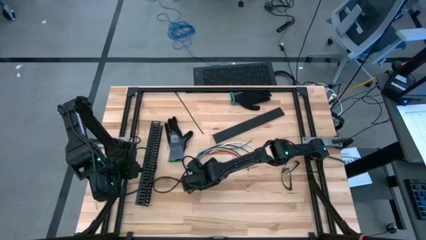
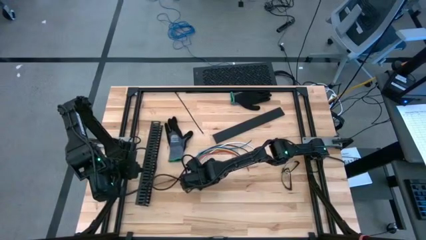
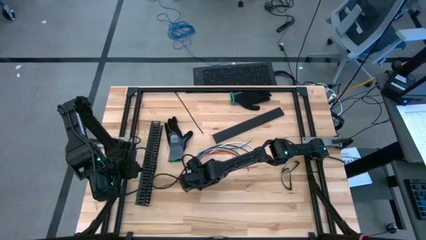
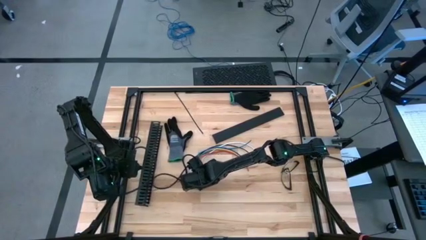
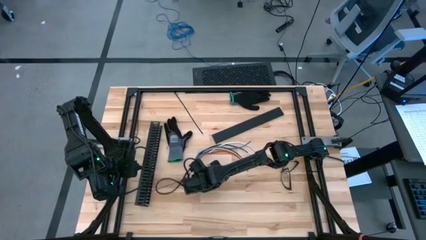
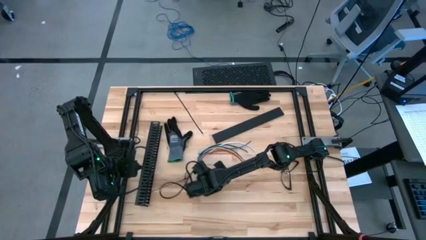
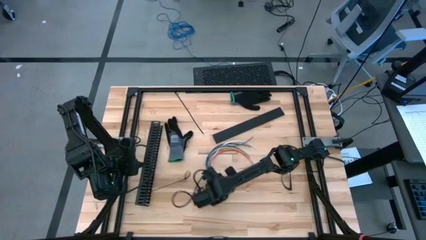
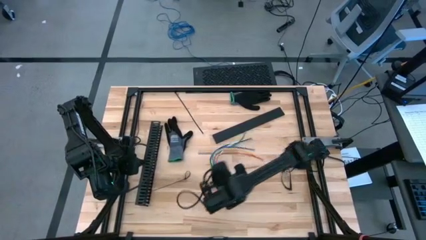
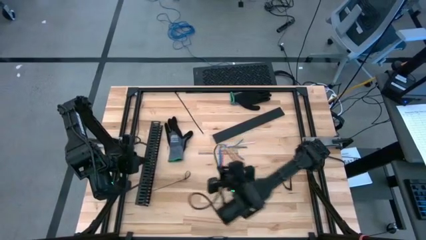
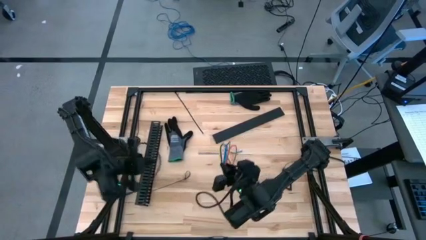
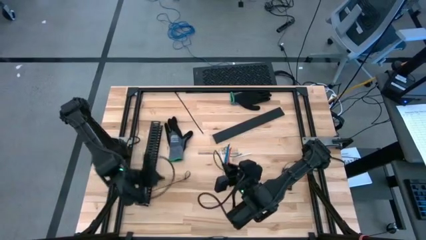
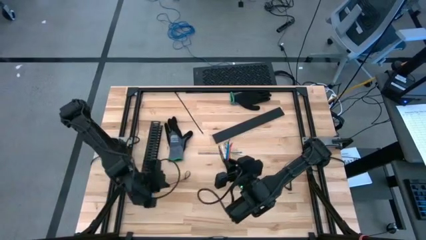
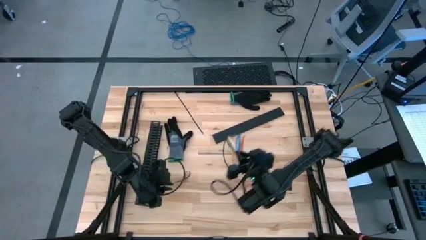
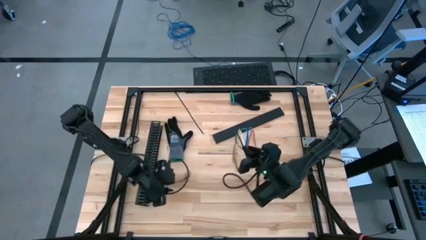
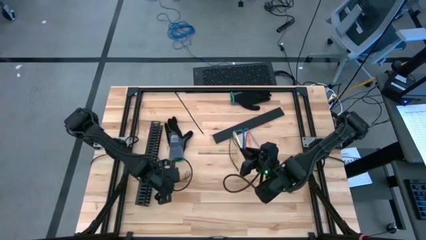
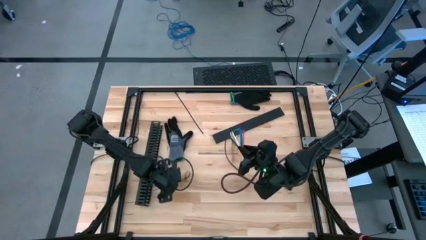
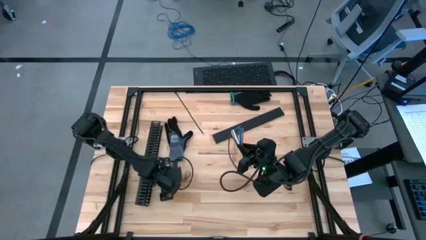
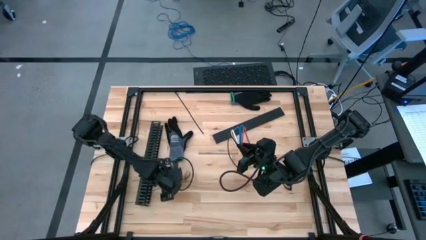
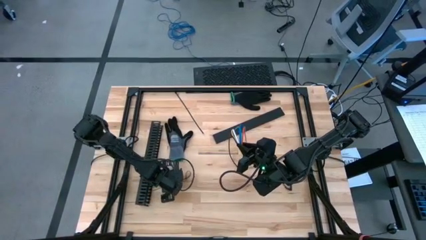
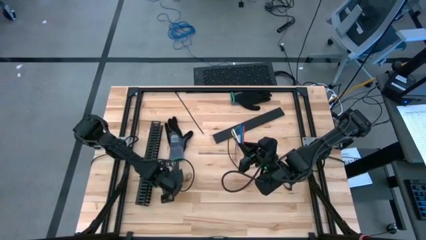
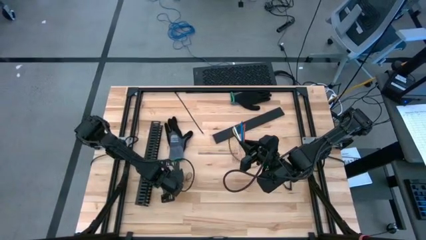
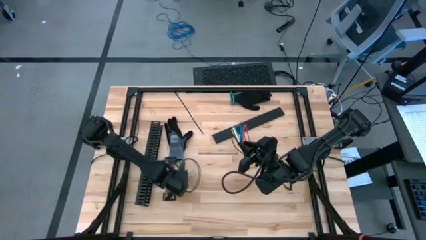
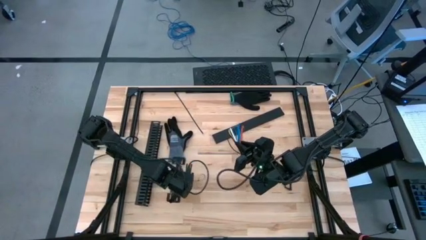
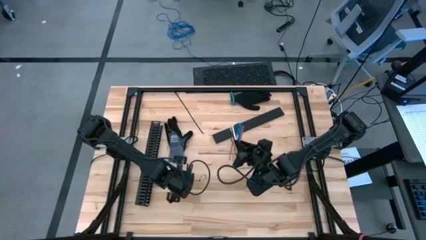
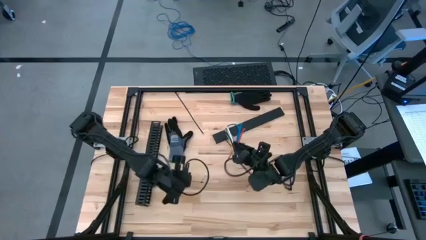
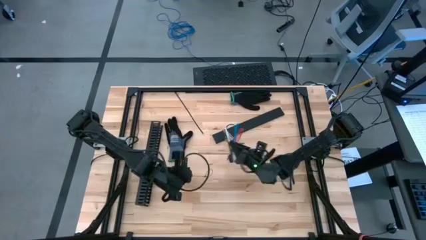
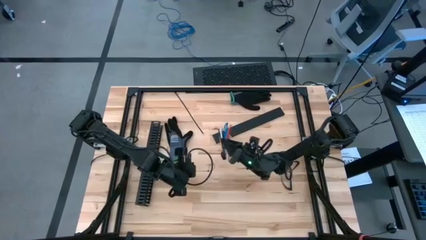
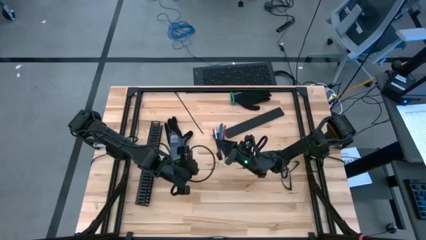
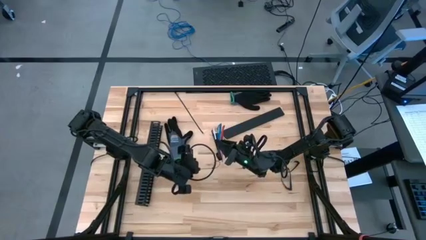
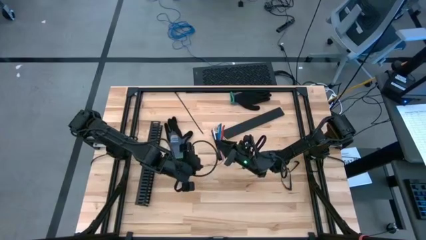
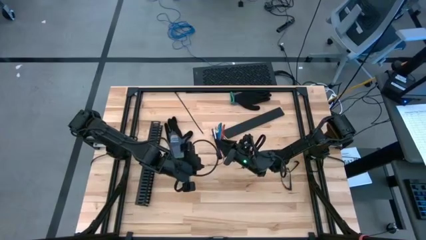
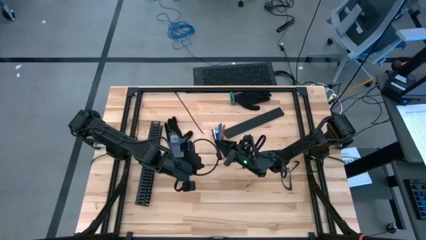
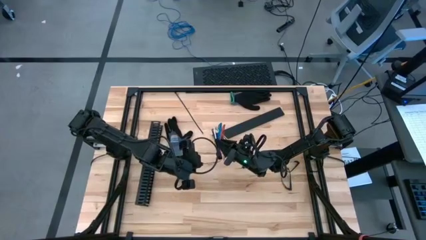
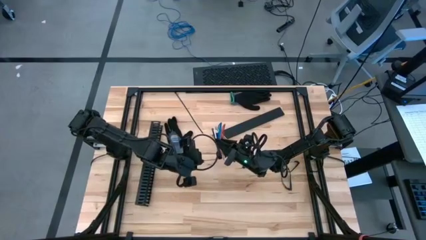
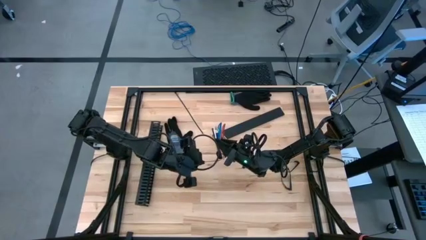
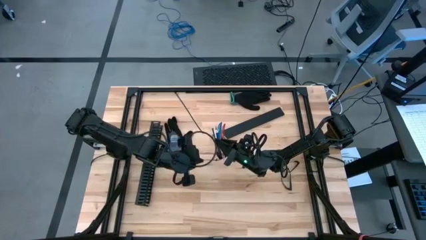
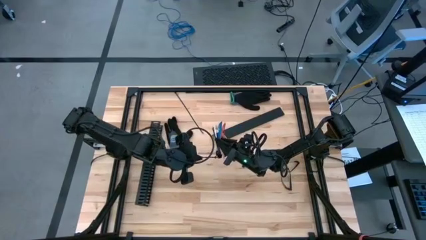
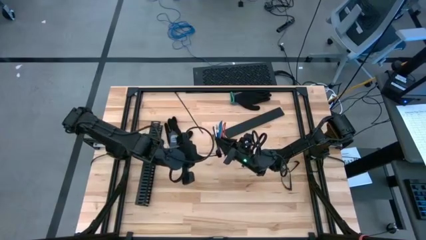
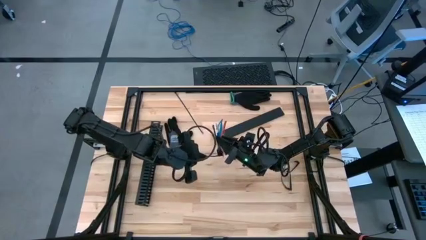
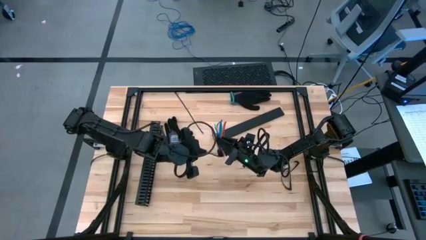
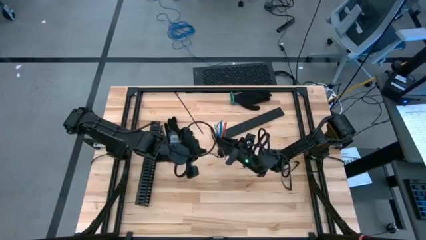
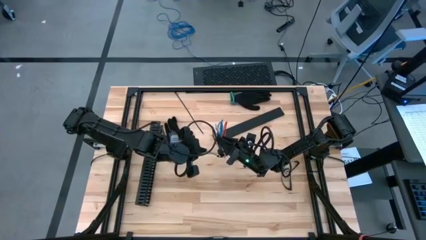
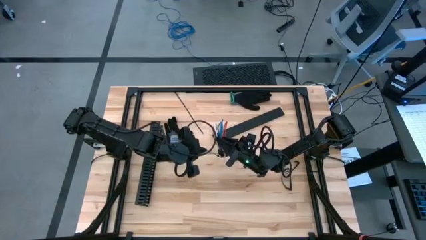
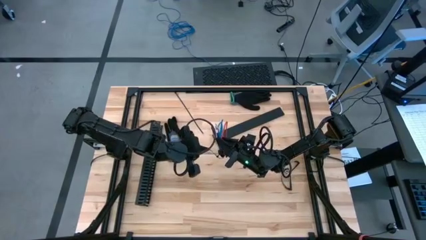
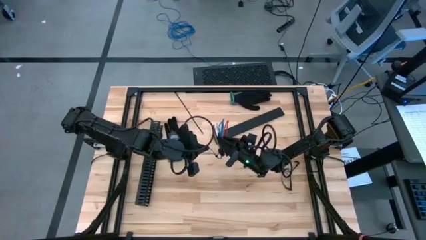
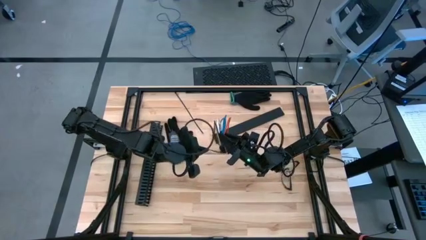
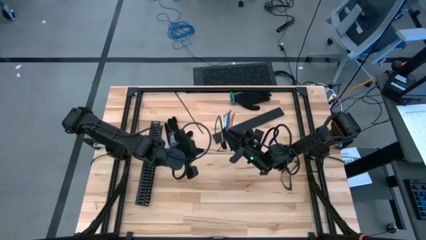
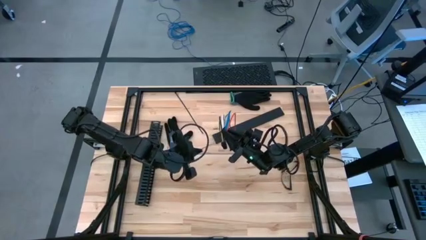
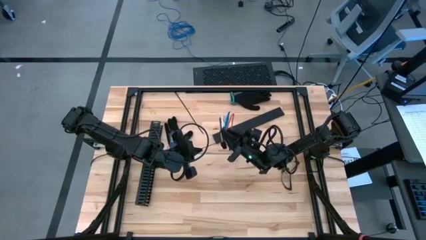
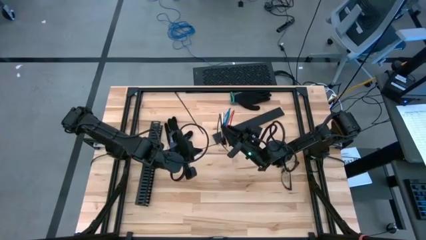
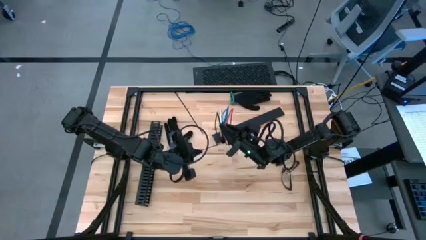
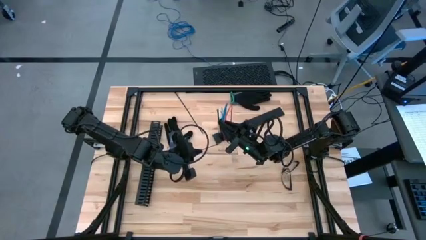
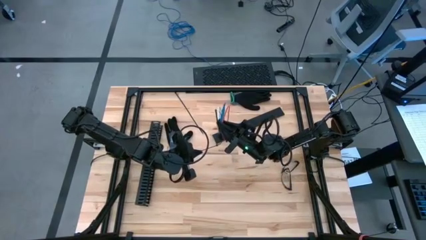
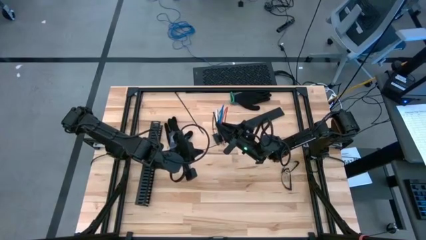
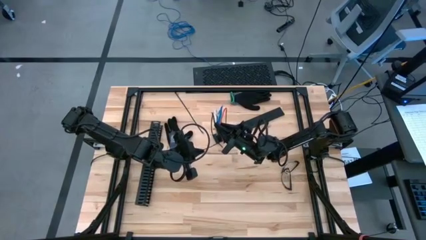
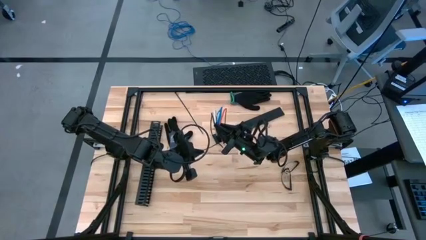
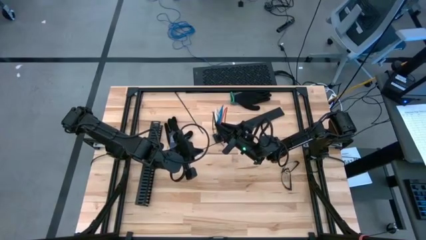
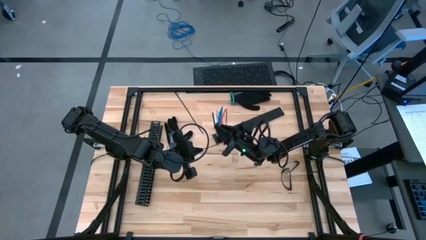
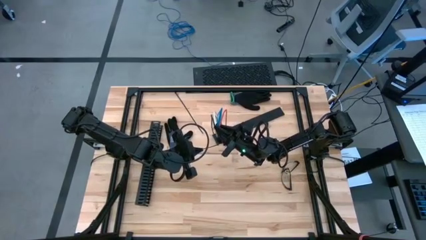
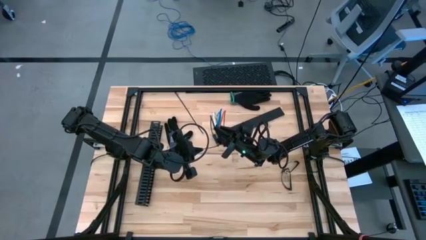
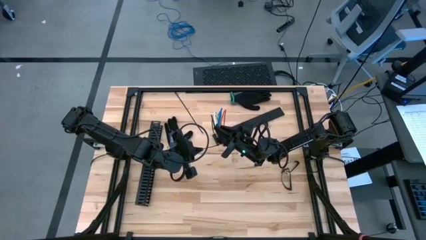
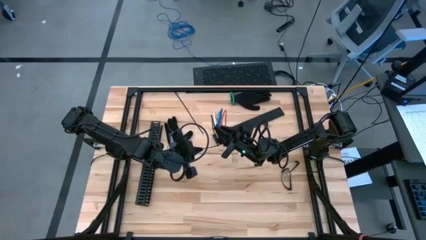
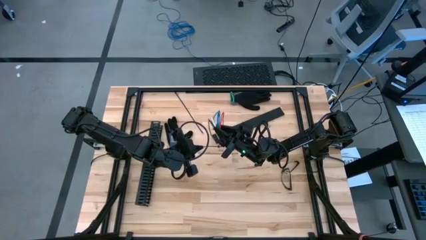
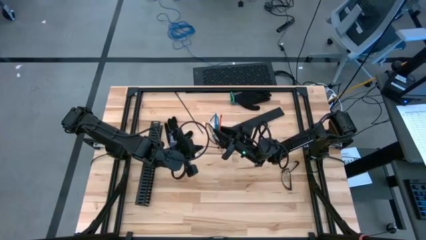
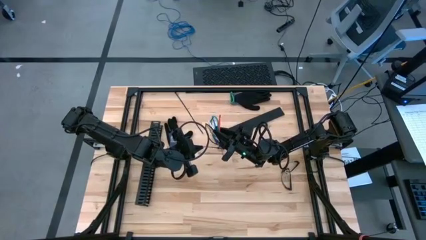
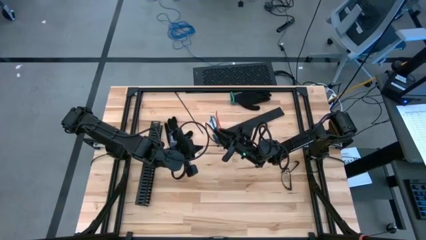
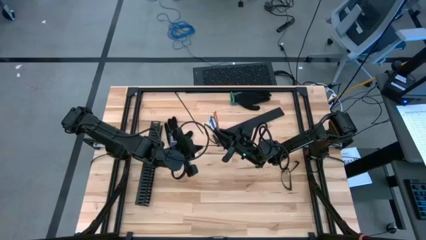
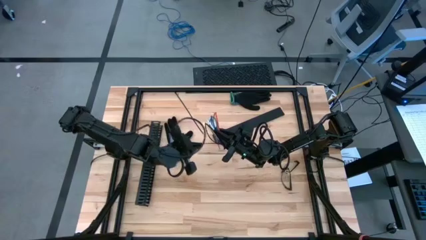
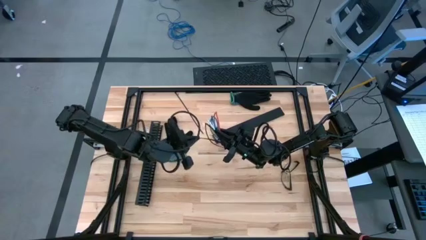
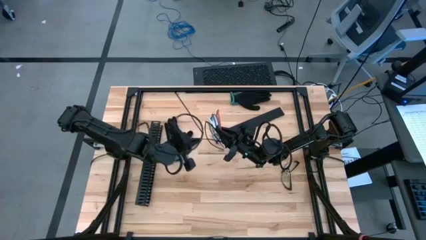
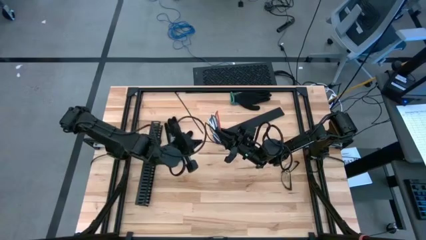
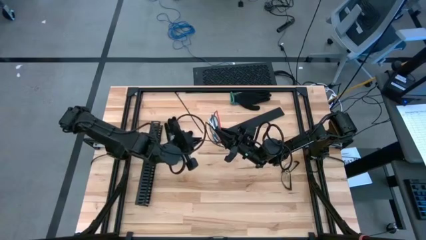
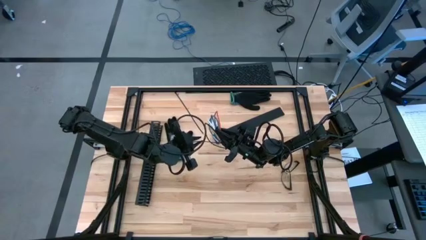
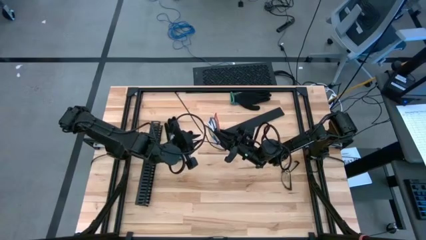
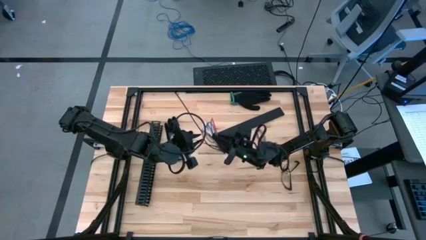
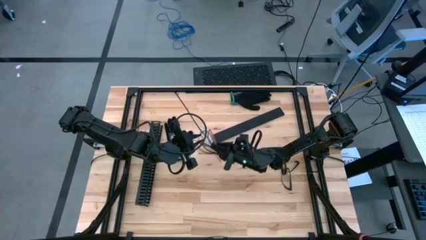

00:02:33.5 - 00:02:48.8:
Task: Ziptie cables
Wrap the cable wires with the black zip tie
